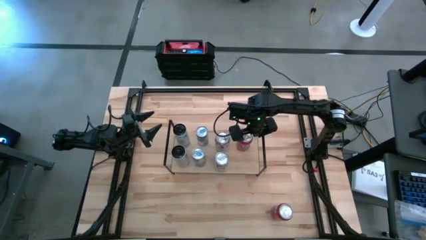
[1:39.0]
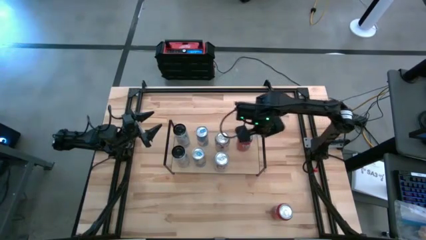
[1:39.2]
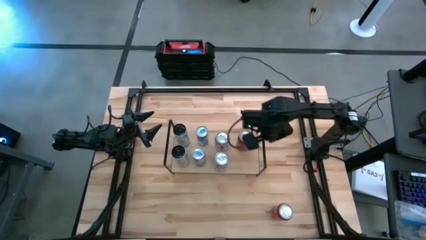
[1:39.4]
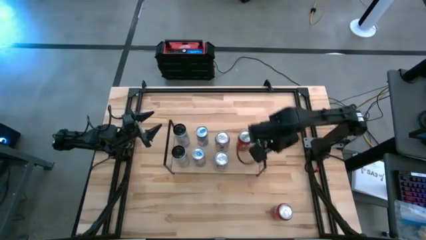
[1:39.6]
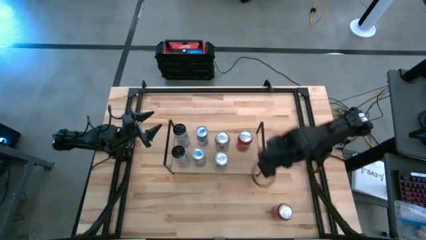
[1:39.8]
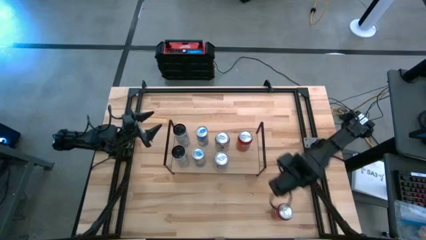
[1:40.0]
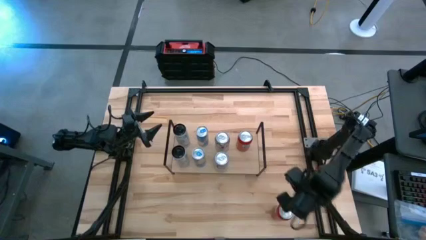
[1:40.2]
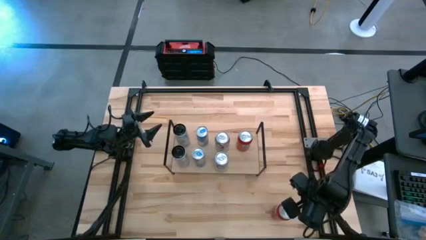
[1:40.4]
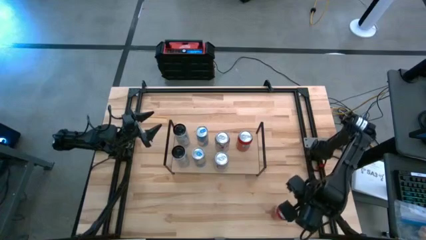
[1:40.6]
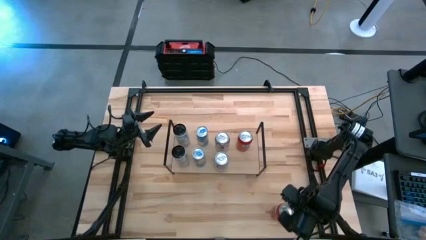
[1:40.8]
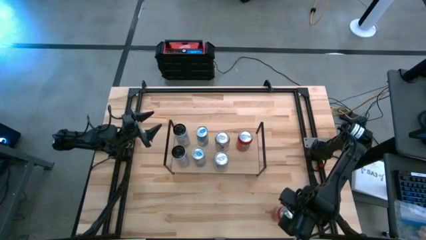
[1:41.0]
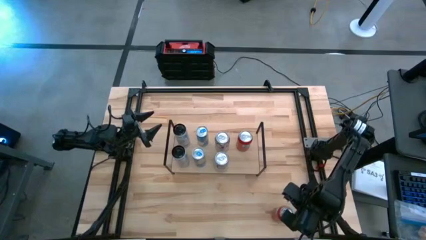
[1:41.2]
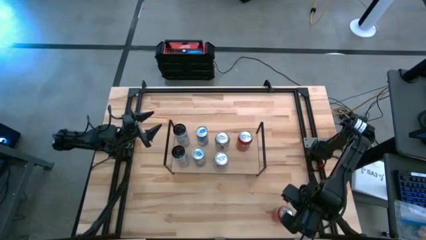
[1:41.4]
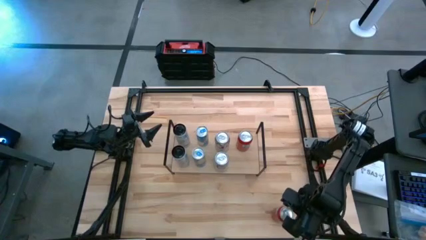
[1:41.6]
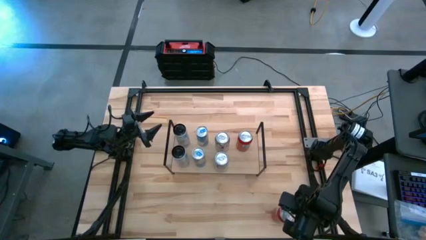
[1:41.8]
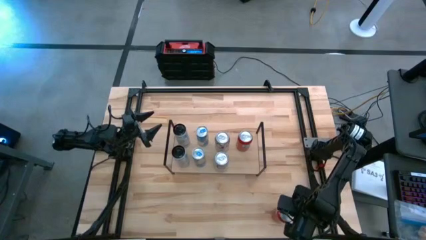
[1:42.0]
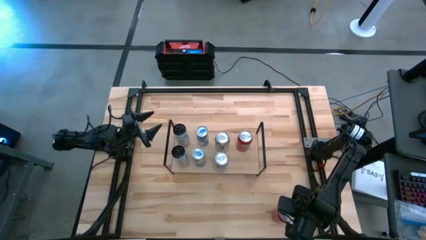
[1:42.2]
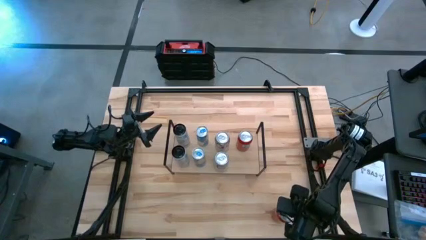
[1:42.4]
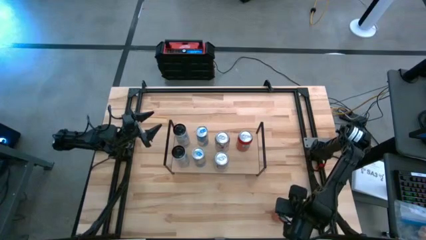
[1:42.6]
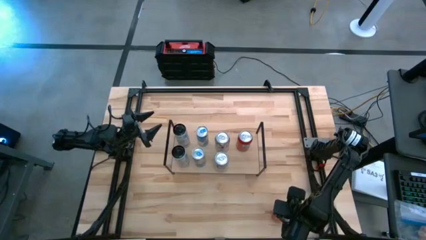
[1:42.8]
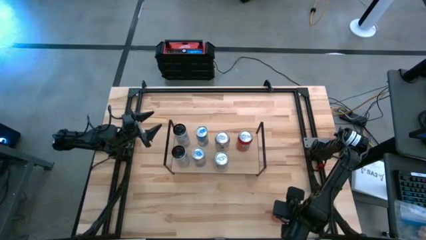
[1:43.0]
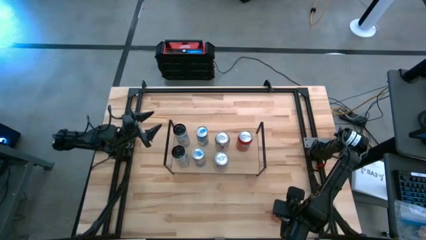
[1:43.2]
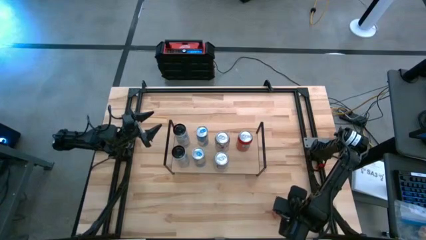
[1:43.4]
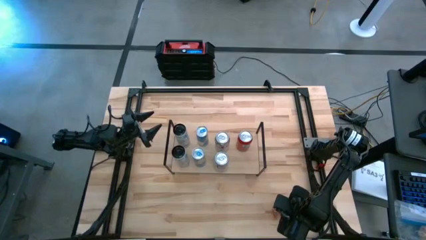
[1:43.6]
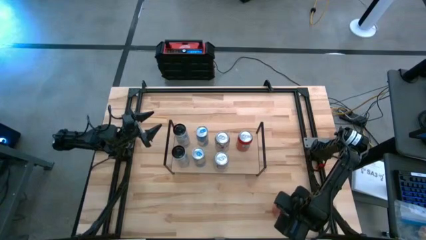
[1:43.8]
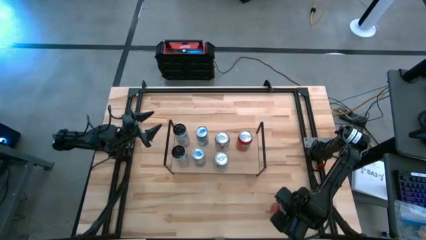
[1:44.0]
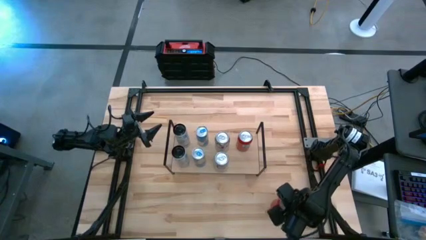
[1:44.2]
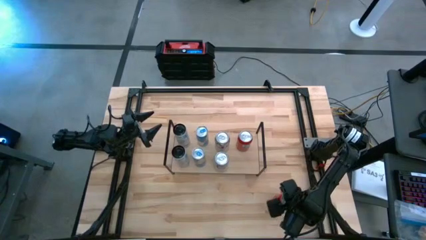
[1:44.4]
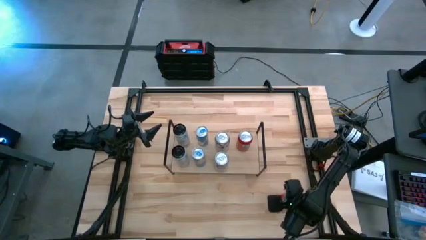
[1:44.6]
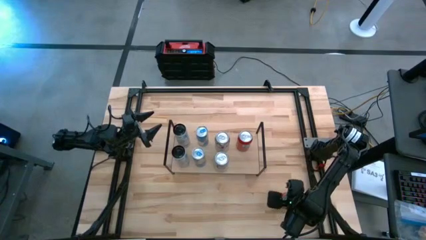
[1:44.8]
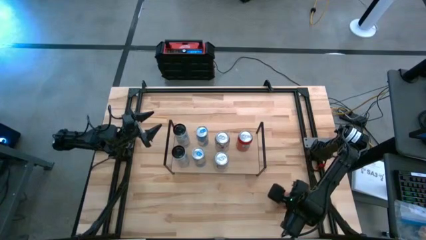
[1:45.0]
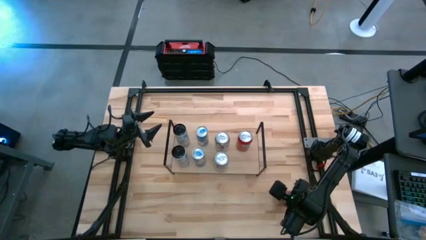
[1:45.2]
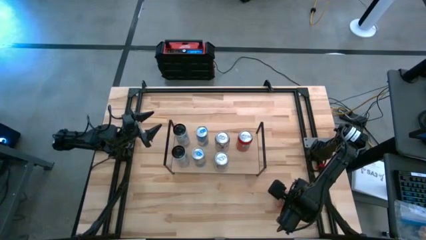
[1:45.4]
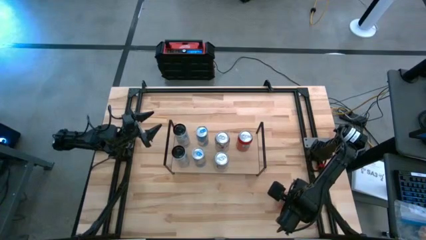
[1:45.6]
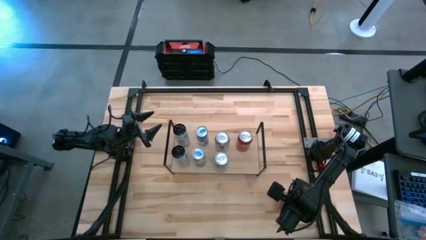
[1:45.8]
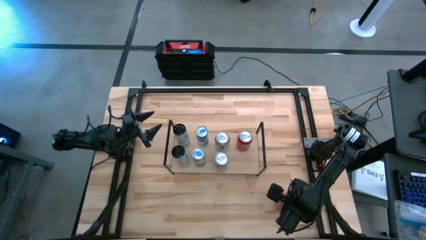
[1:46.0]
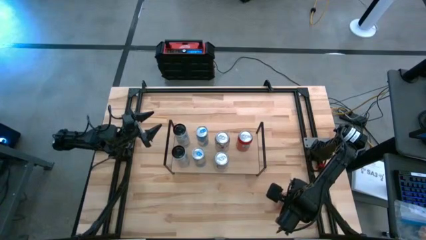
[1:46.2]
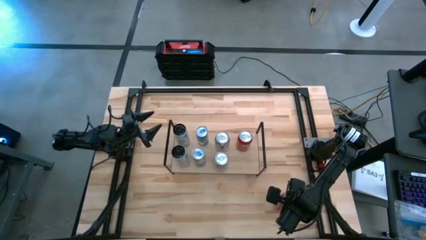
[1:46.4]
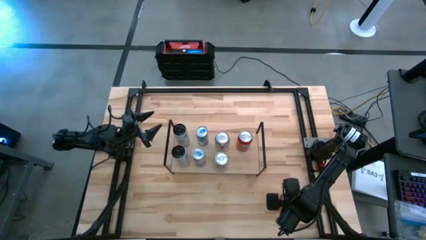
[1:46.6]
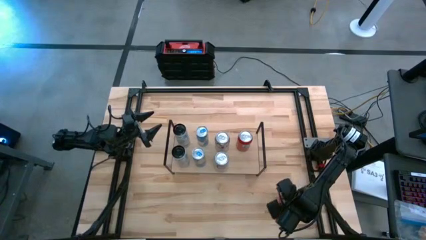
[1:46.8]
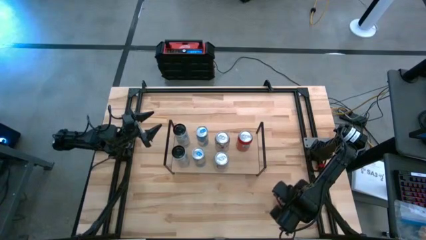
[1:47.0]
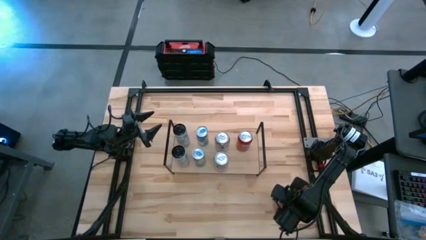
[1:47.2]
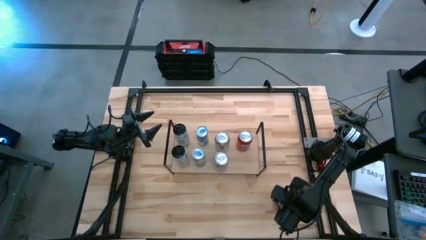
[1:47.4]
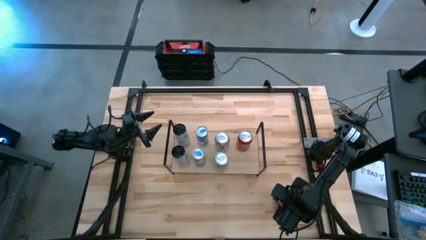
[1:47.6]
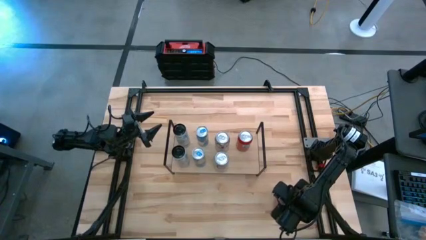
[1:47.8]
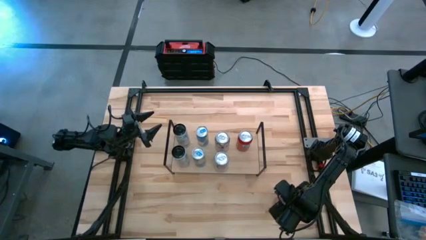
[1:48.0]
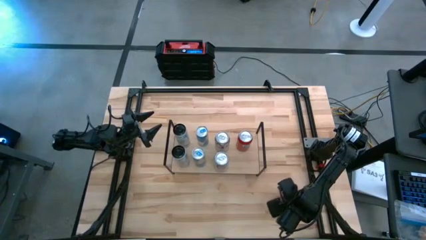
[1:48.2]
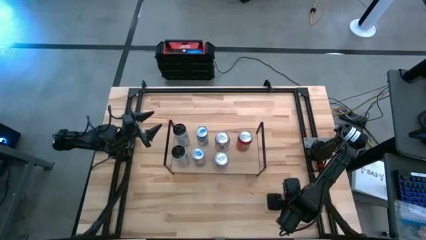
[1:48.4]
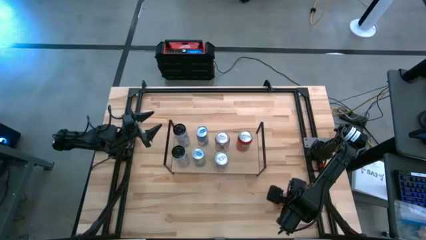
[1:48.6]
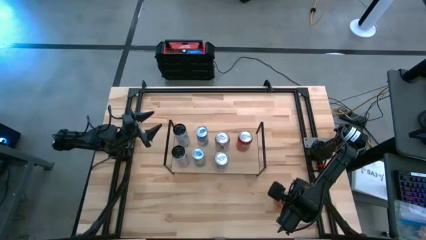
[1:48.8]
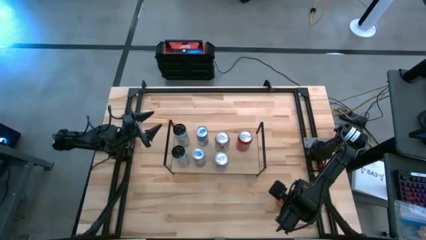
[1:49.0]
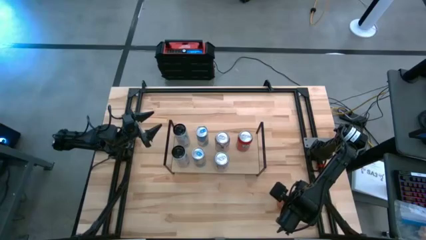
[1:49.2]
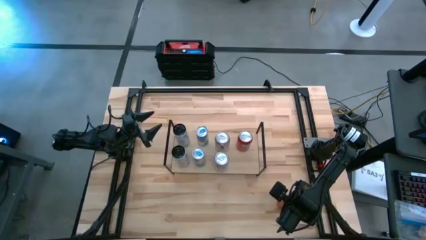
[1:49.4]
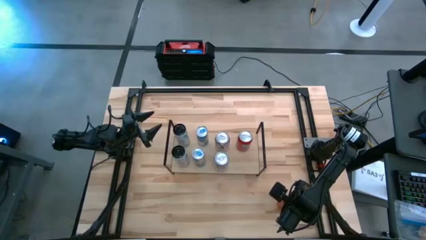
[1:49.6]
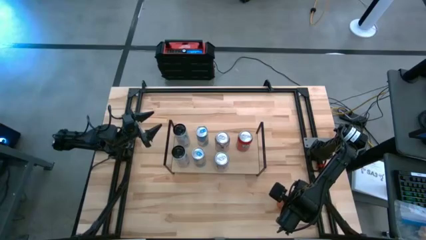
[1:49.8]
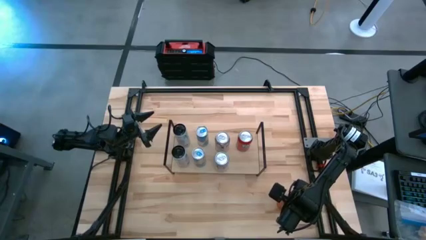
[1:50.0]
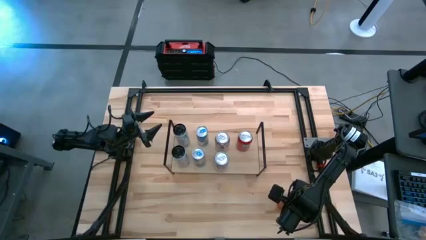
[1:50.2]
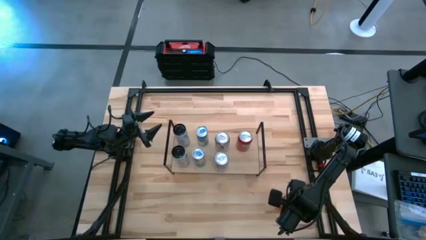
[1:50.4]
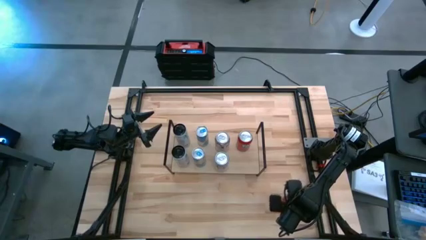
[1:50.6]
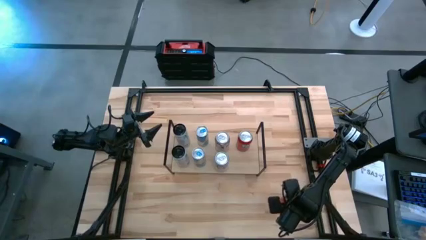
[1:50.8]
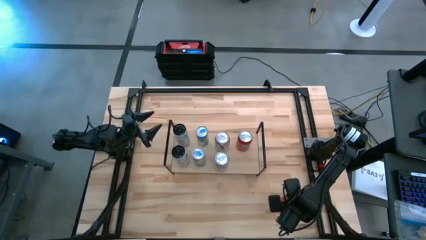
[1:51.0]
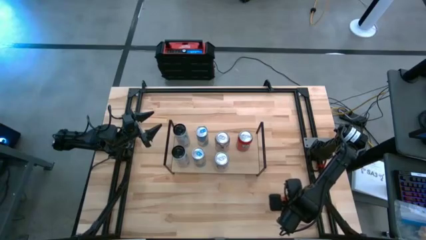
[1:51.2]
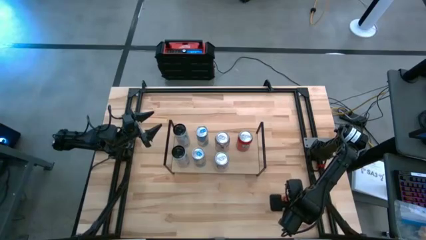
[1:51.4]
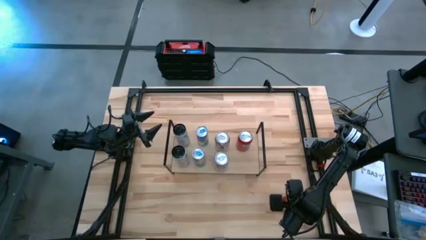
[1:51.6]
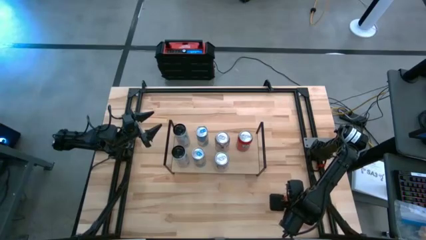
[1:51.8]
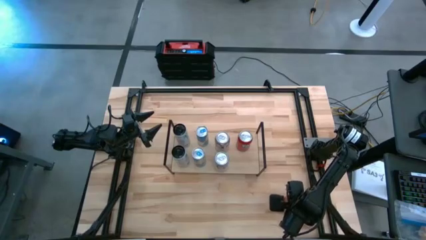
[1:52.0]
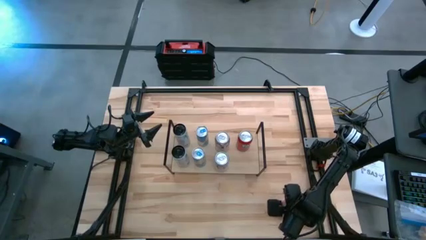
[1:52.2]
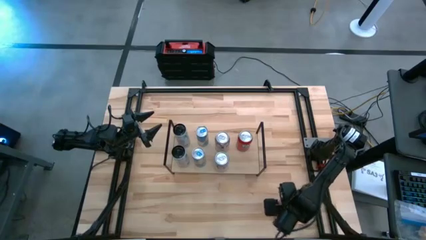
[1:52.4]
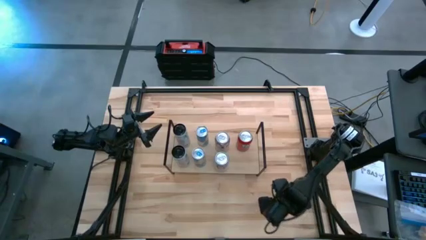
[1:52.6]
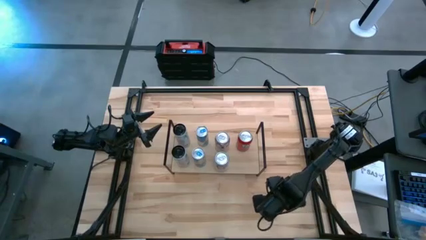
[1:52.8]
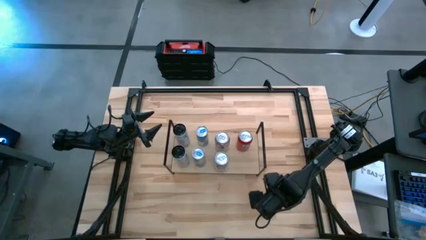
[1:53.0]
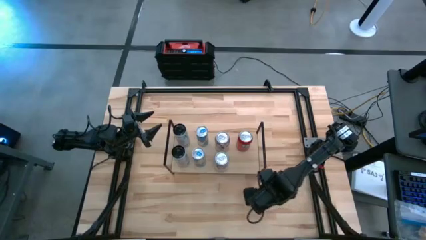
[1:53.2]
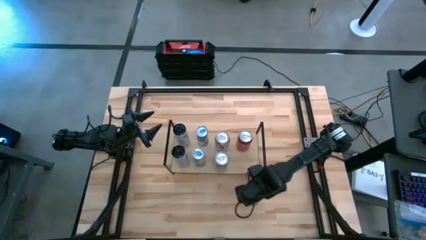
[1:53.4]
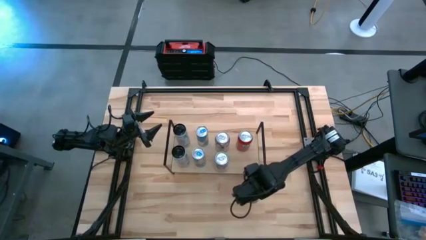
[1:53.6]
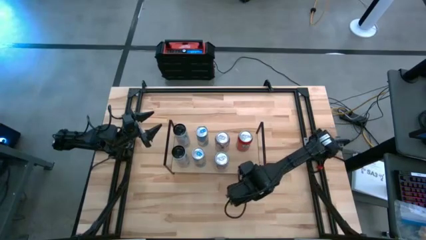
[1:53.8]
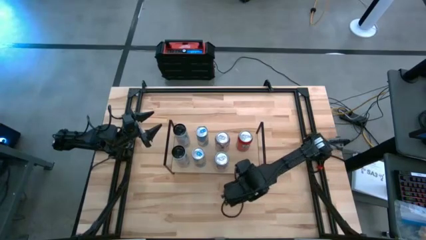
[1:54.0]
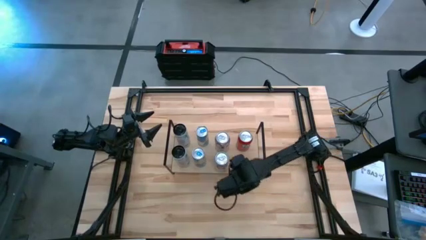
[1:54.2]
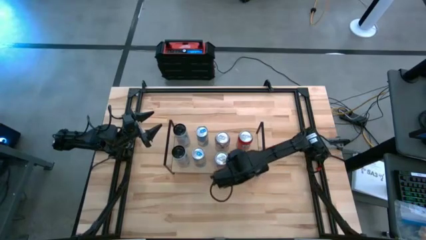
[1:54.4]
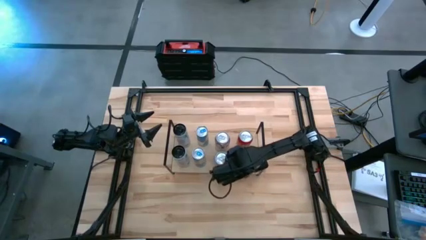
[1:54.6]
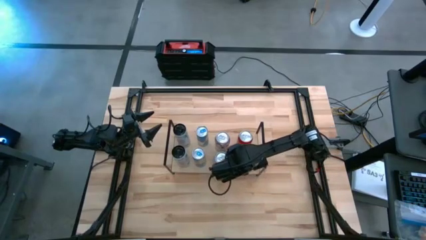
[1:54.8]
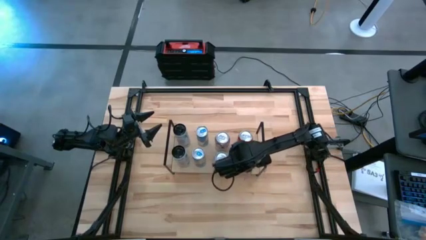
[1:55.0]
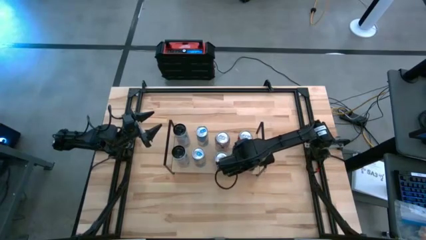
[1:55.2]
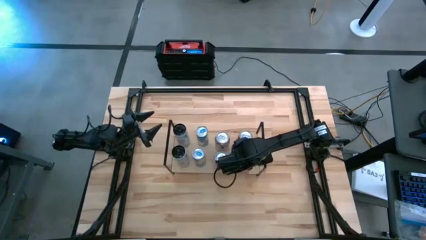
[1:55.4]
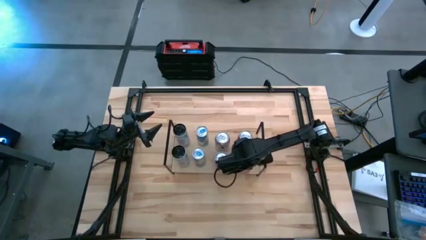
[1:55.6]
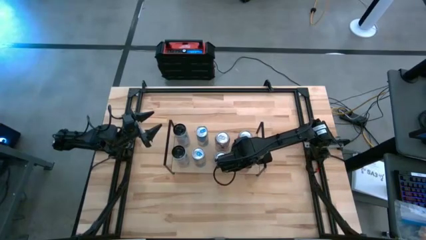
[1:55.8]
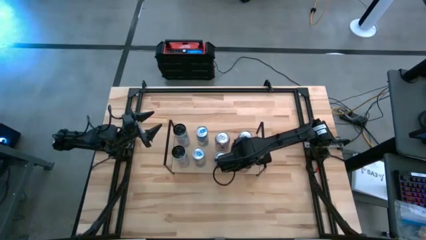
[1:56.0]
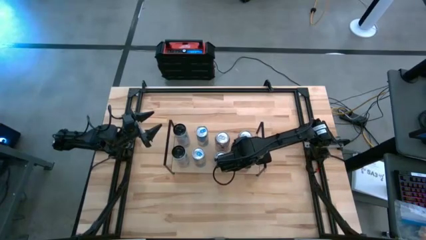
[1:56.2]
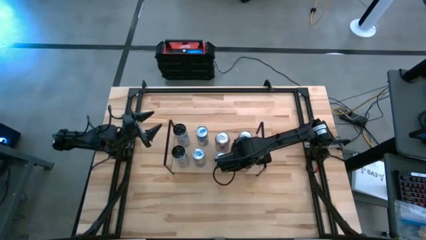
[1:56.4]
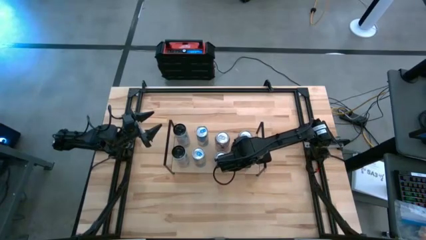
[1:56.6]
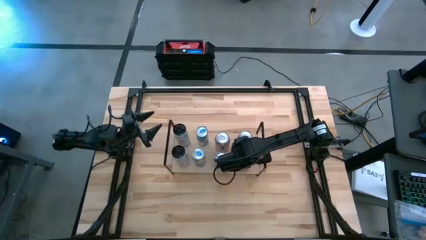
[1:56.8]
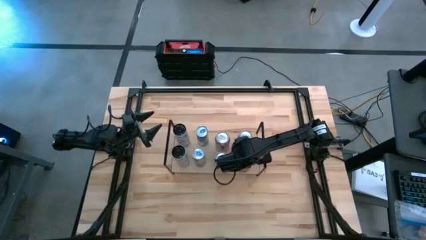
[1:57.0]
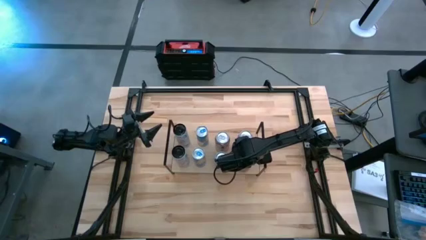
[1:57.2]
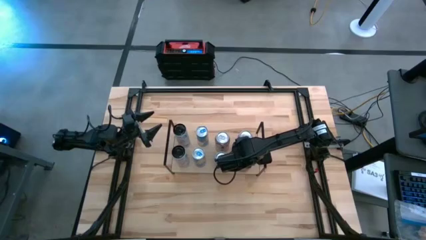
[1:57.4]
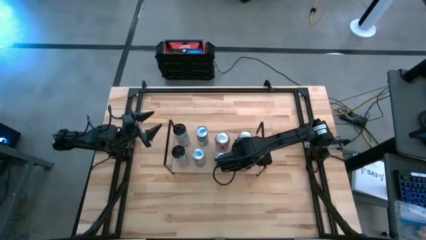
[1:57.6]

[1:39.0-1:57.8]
Task: Place canned beverage on shelf
Put the red soda can on the shelf aligned with the red soda can
